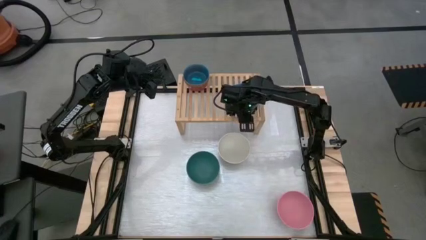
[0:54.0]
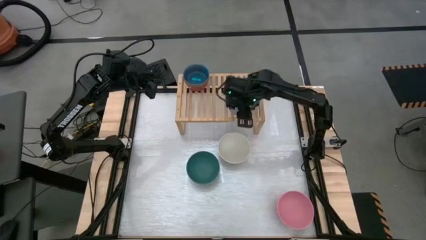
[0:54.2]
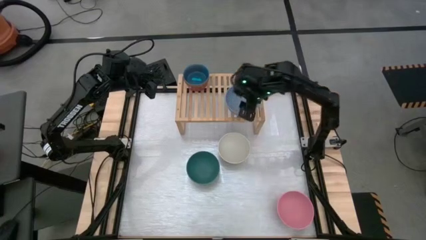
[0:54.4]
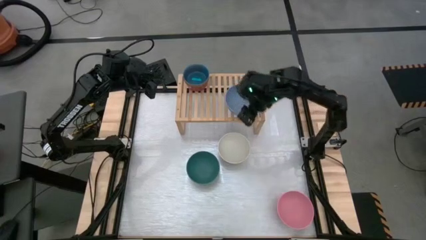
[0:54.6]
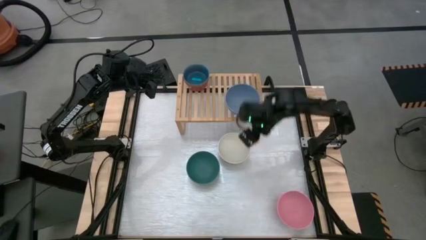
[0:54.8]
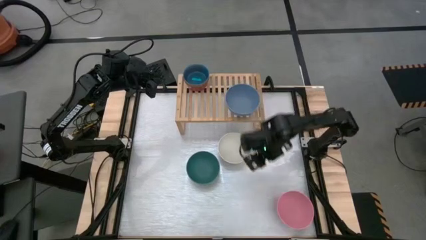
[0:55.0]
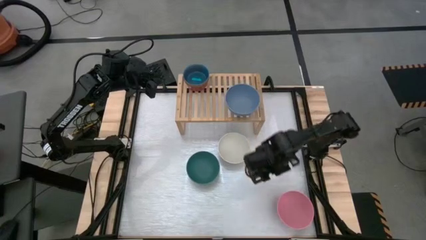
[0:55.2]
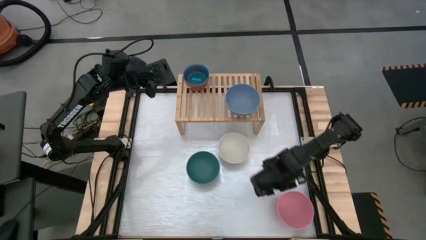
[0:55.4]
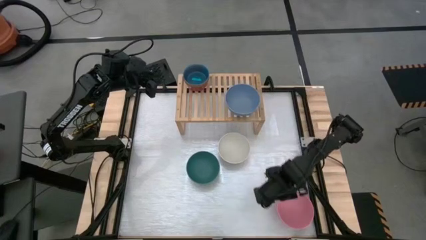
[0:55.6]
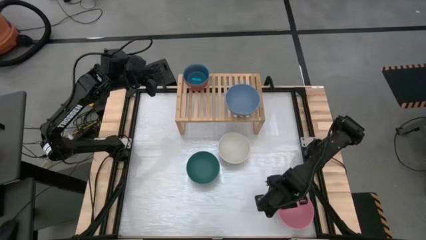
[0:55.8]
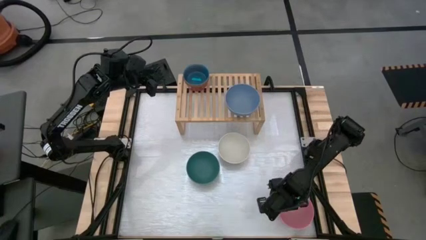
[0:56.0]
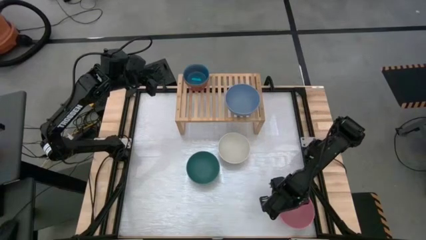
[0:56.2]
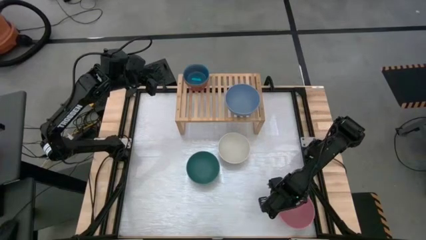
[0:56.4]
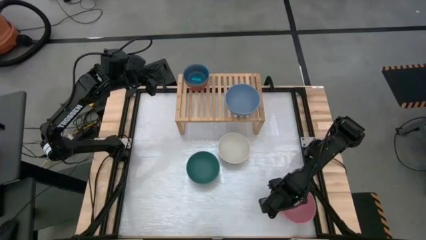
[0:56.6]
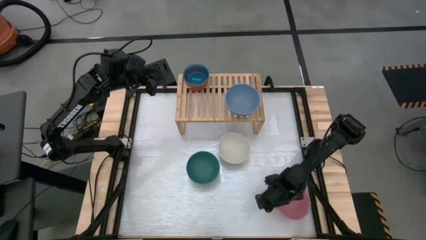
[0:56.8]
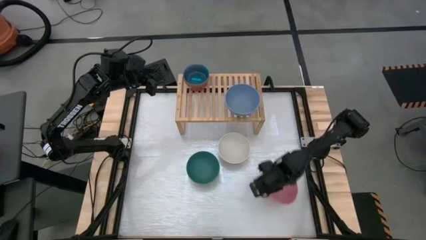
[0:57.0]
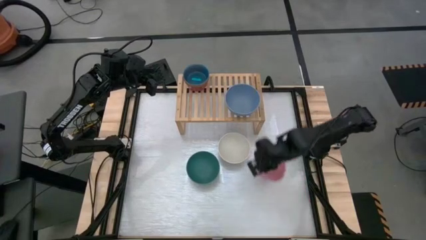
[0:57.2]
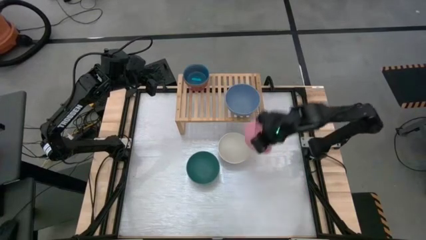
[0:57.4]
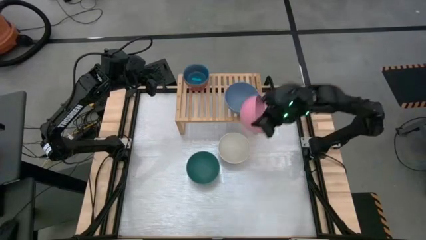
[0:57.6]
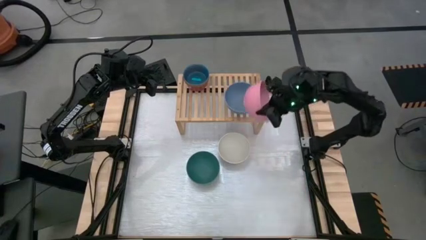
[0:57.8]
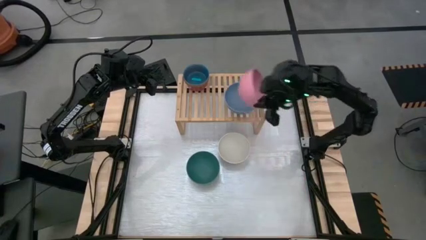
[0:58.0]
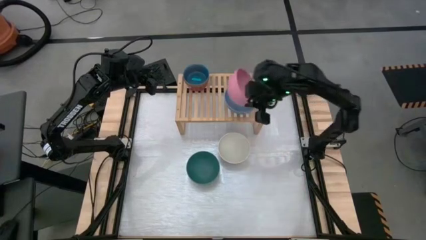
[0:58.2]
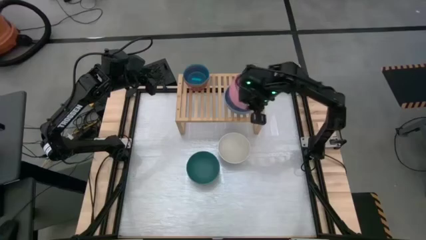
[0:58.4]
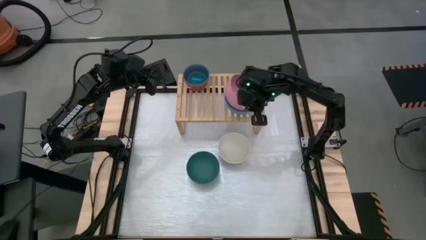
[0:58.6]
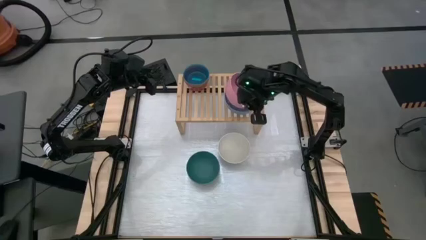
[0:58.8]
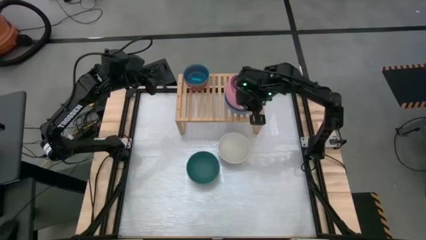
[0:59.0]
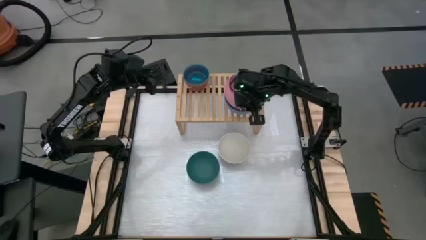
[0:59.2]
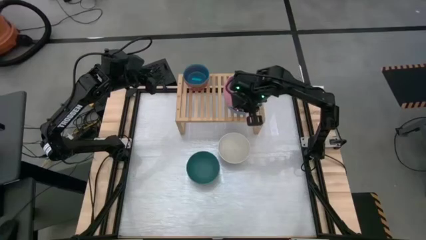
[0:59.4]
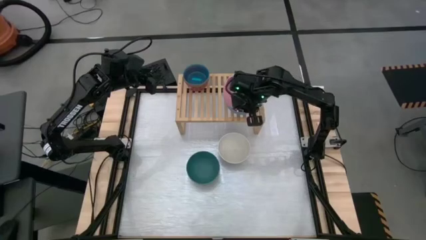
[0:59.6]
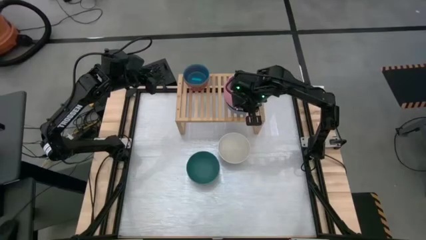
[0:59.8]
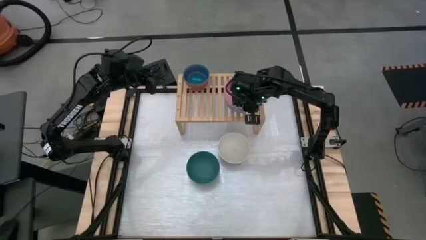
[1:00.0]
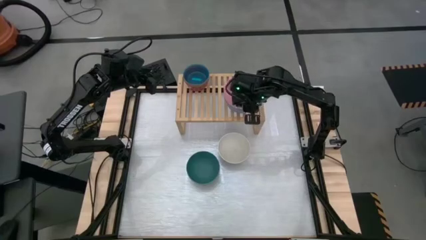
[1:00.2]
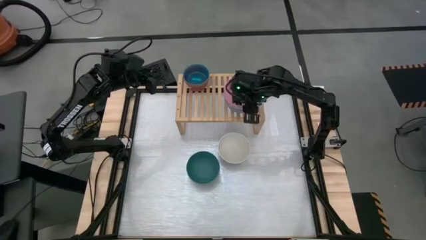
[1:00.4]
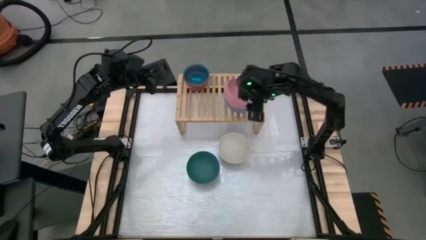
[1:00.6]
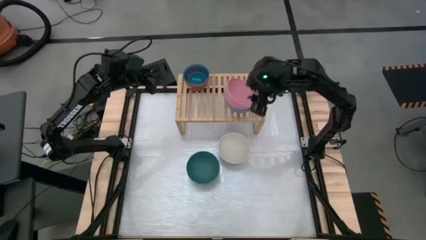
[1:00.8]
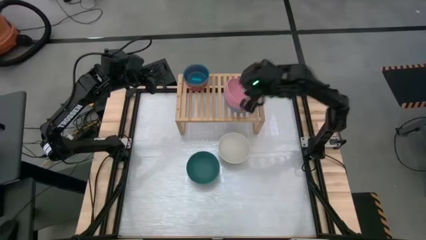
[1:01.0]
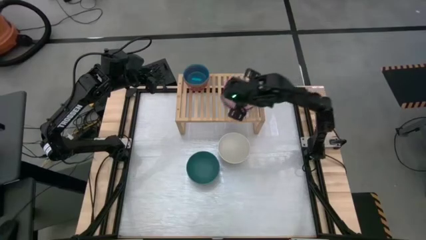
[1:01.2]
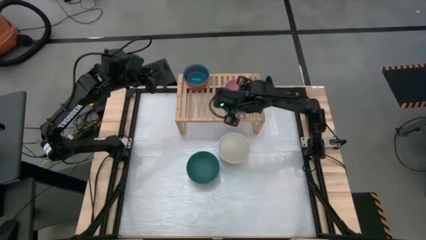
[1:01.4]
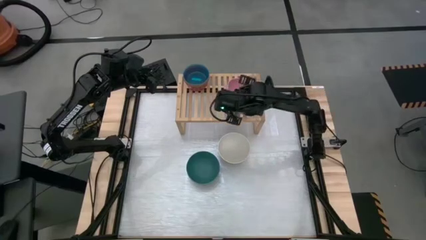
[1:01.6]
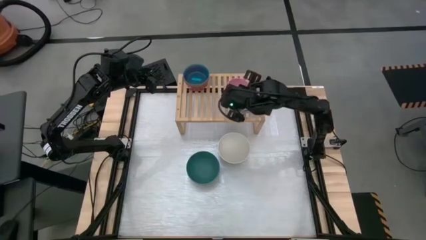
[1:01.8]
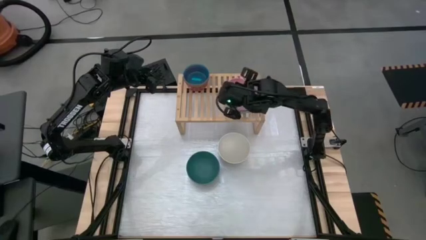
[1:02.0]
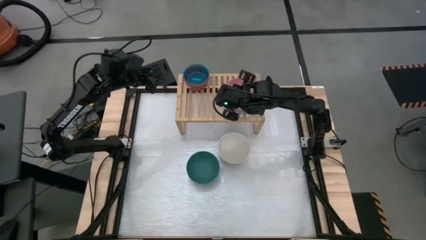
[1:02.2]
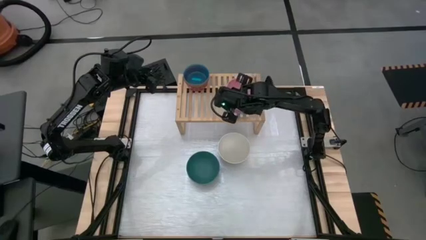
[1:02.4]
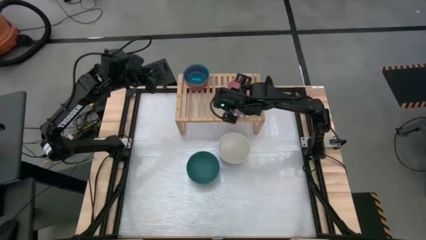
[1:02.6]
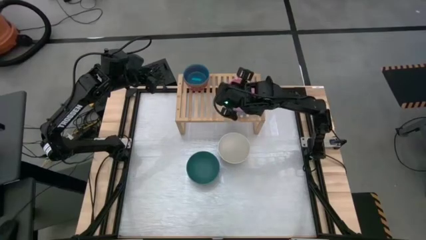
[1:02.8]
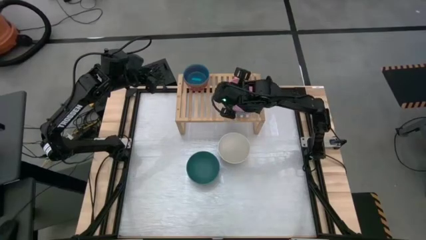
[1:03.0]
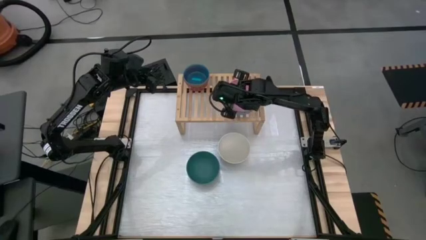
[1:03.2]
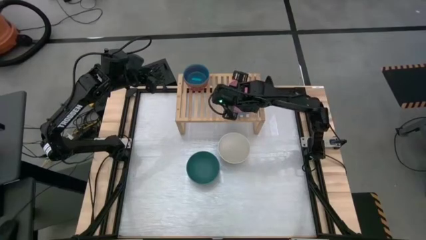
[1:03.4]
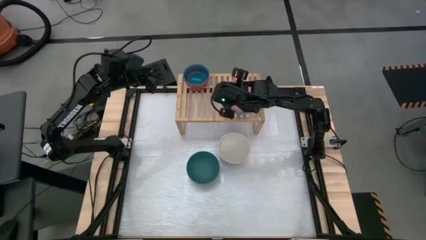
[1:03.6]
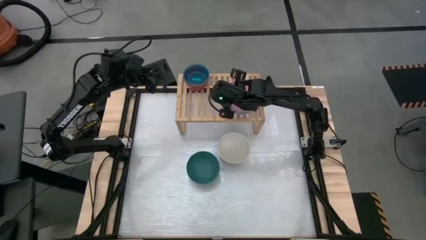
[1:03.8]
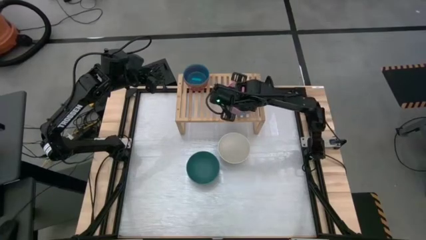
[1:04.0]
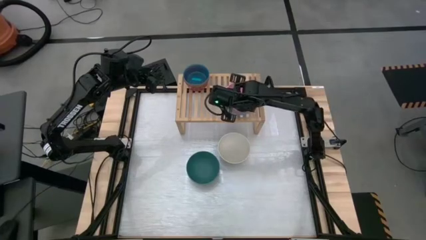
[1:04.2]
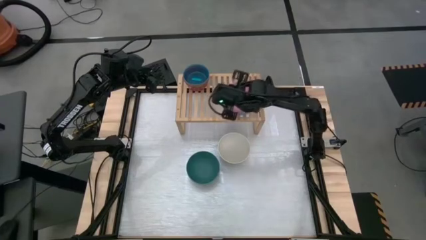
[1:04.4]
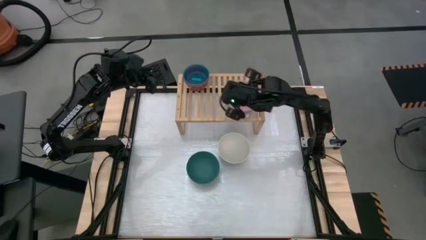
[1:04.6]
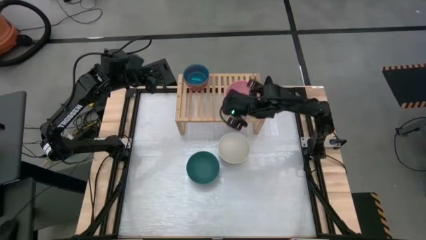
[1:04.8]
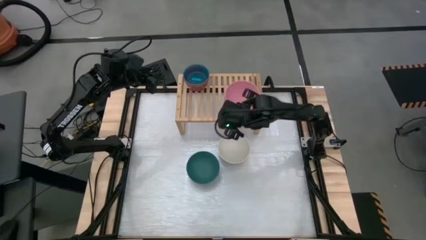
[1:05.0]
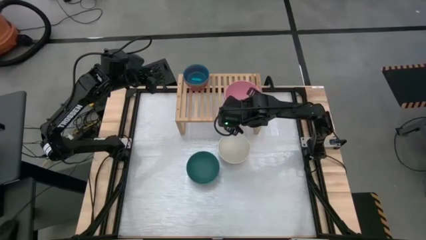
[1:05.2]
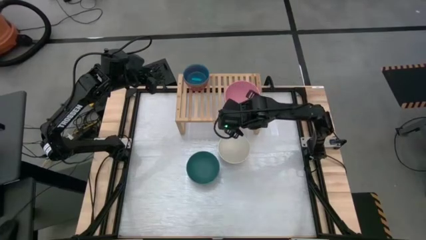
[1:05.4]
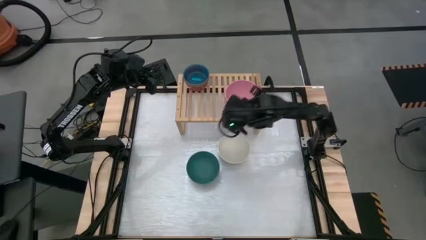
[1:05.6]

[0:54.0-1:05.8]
Task: Place and stack bowls onto a shelf
Stack the pink bowl on top of the blue bowl on the shelf

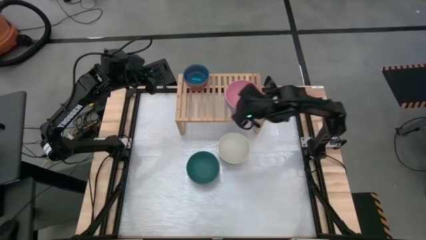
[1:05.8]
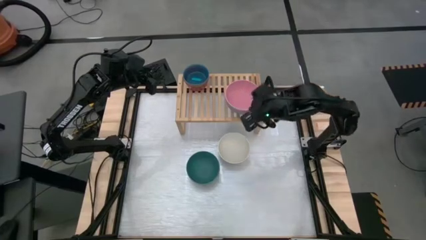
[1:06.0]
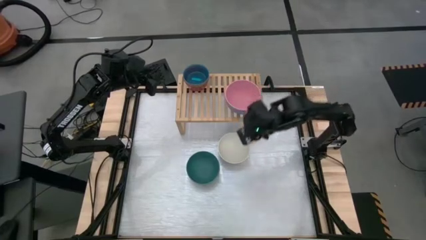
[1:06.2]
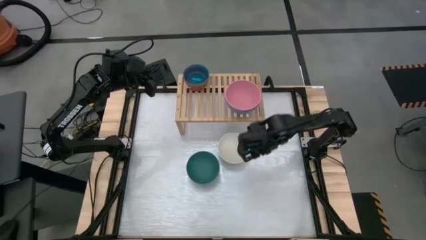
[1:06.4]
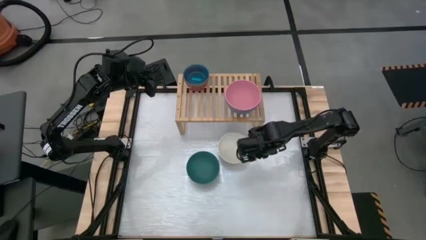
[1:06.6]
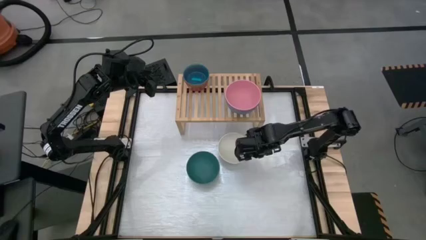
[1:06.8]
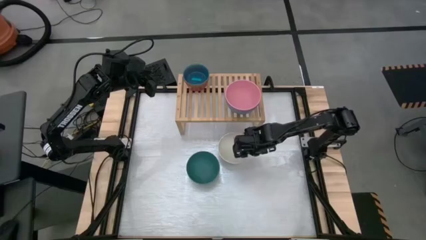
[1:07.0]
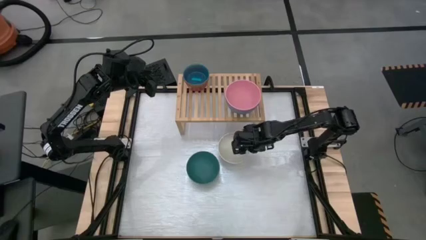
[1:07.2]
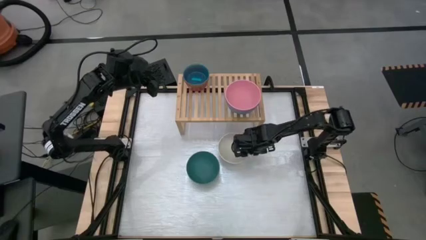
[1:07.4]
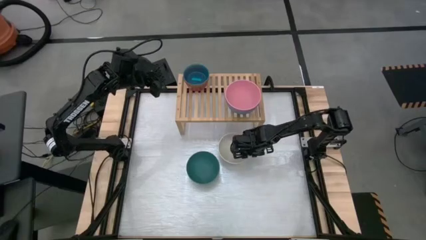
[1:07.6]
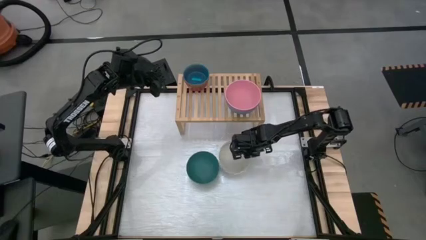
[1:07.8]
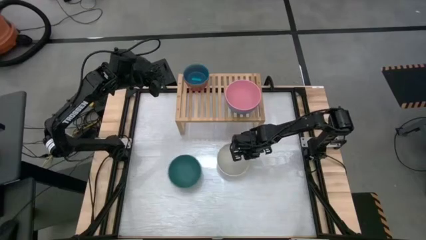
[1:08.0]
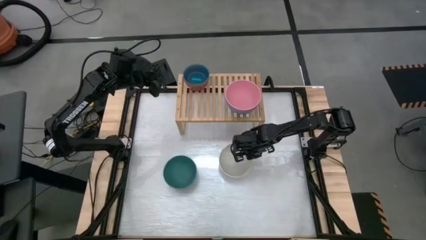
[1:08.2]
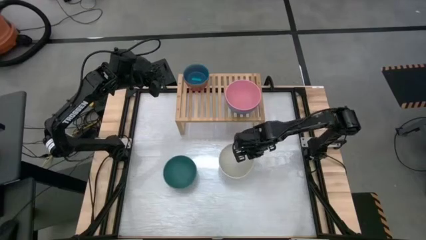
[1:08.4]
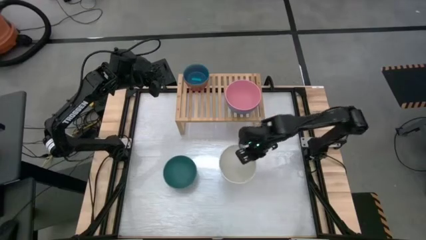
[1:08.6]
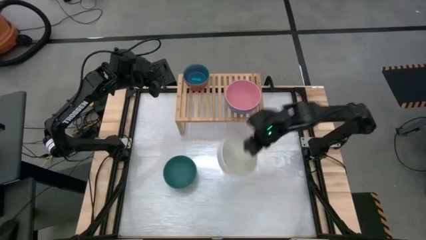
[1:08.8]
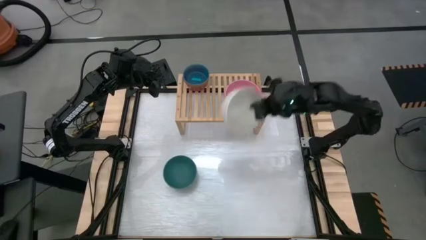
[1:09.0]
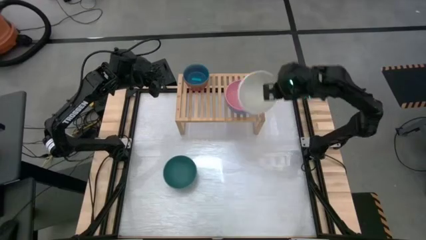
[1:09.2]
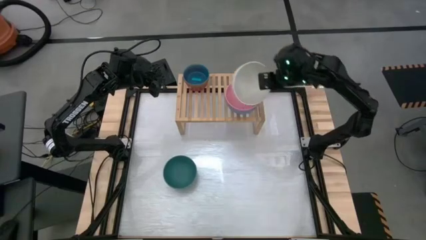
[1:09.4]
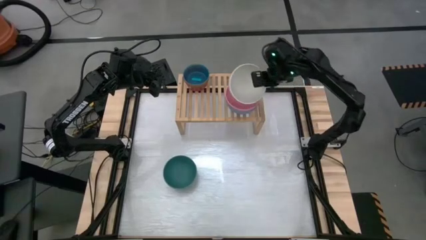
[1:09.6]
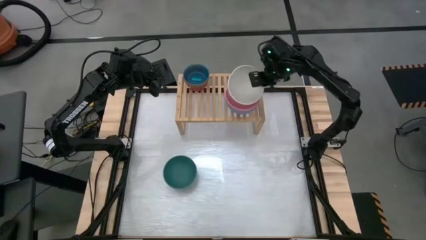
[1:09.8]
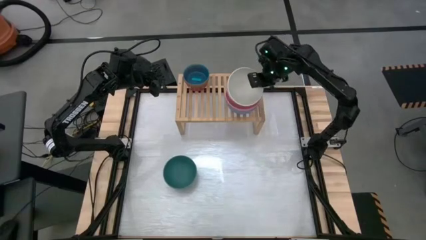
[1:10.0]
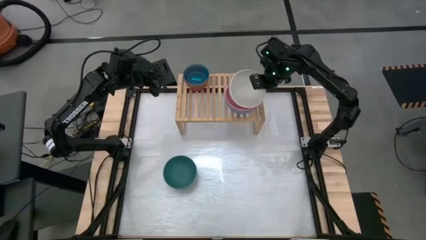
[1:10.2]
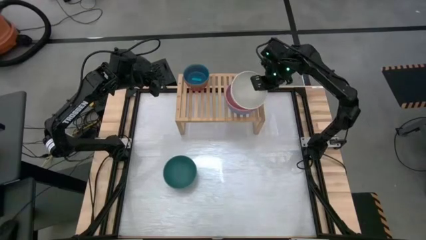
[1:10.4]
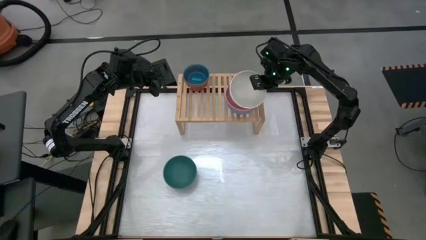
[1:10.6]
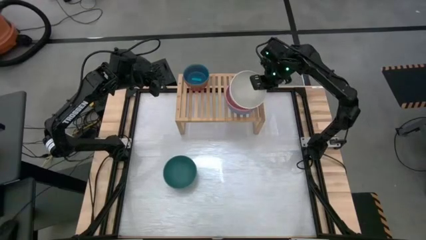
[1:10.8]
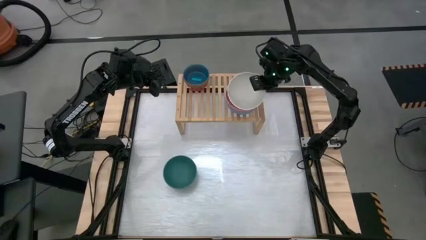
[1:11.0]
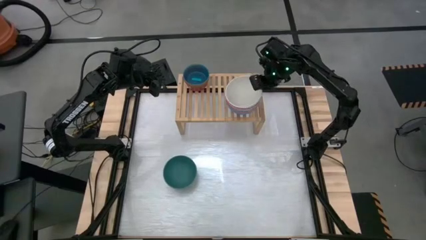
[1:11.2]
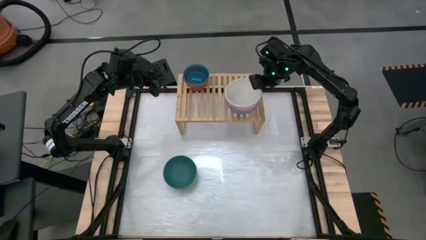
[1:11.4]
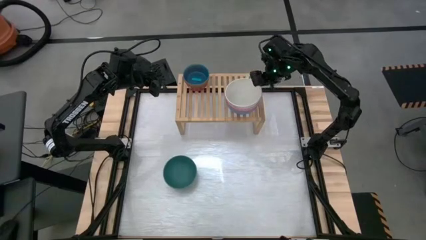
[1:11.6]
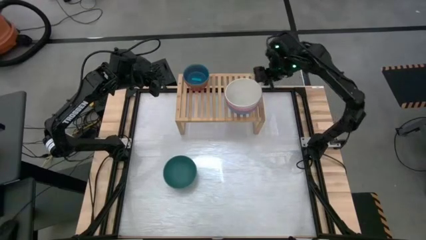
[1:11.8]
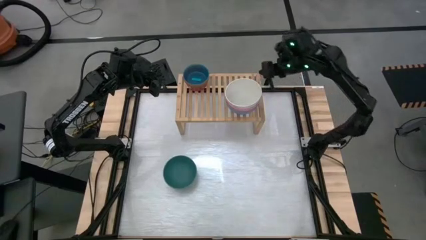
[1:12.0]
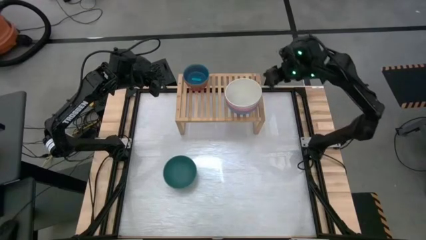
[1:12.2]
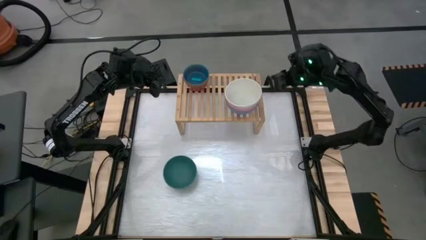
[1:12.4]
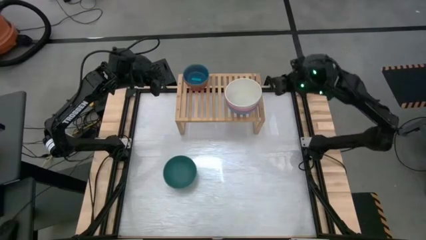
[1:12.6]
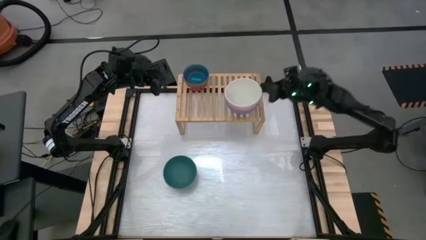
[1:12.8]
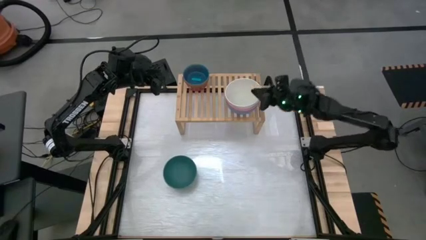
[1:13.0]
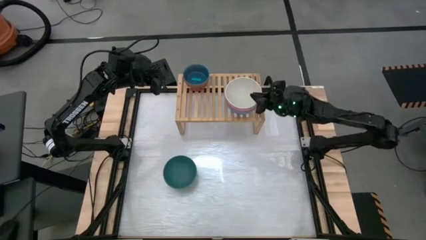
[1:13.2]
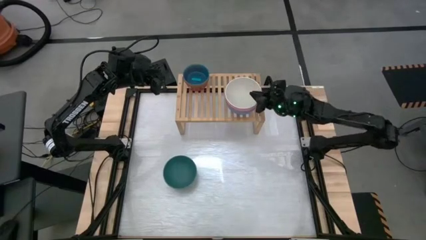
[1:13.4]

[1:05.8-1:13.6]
Stack the white bowl on top of the pink bowl on the shelf
